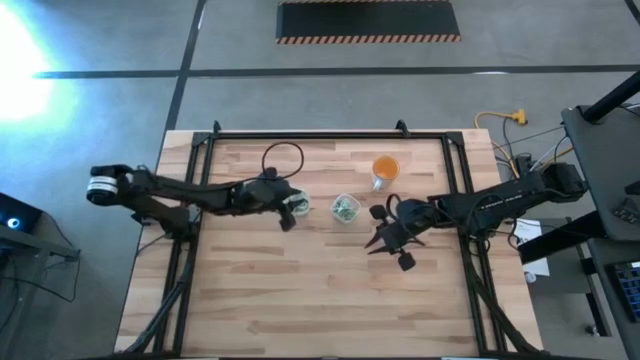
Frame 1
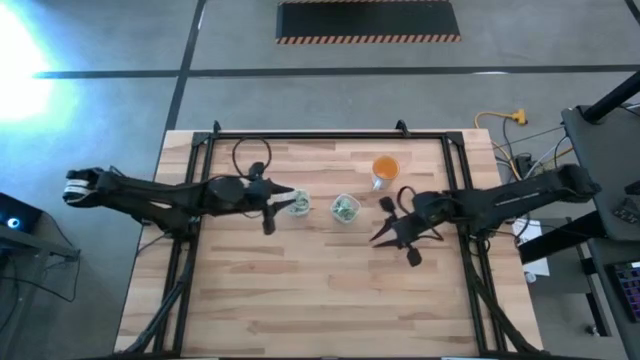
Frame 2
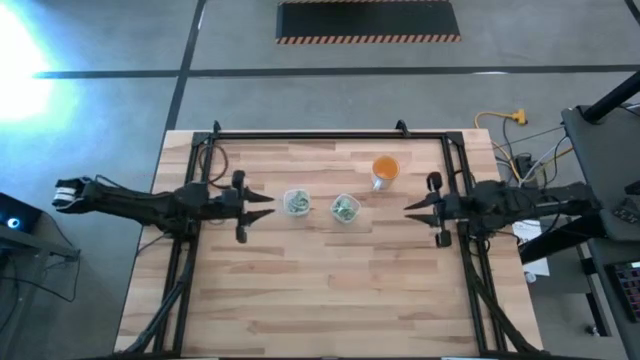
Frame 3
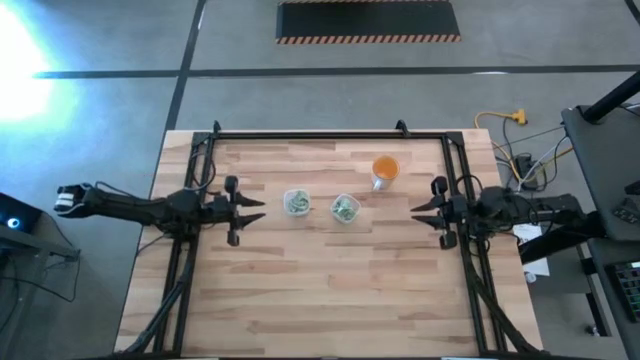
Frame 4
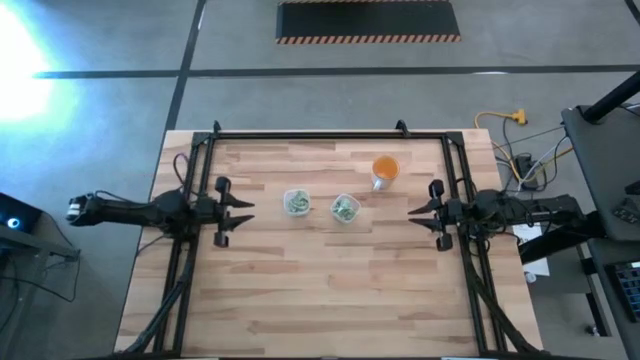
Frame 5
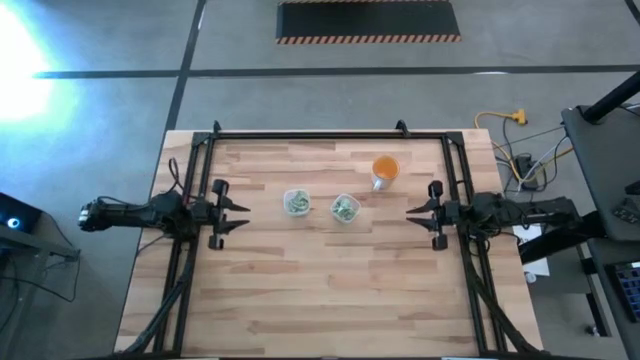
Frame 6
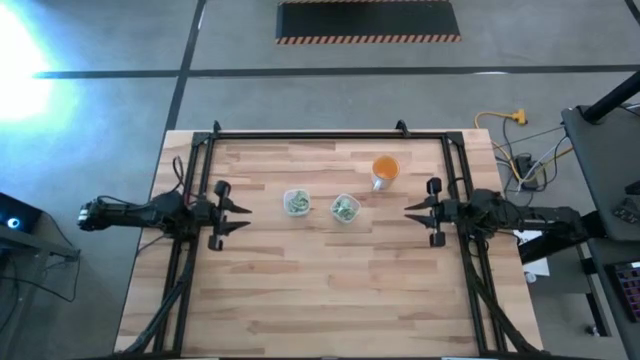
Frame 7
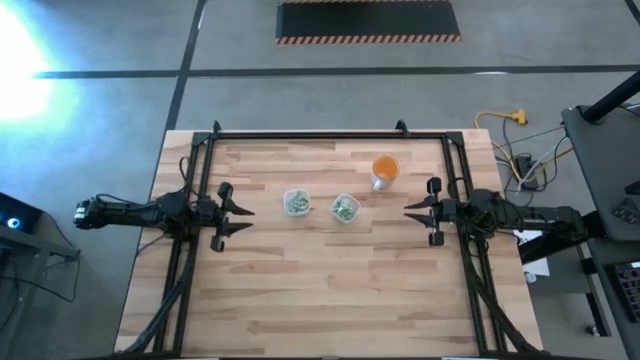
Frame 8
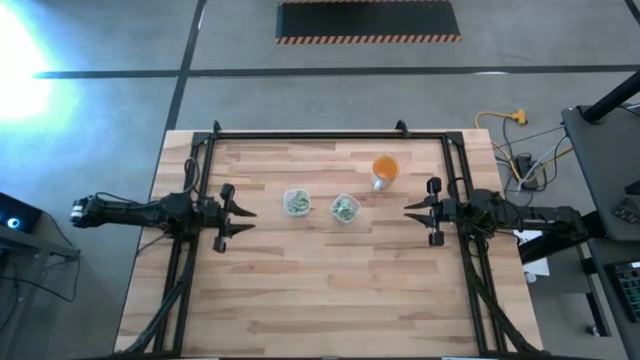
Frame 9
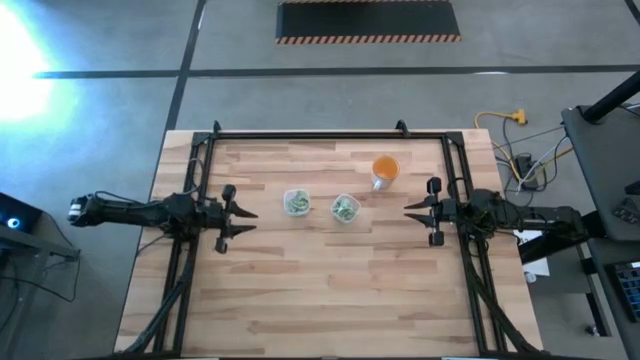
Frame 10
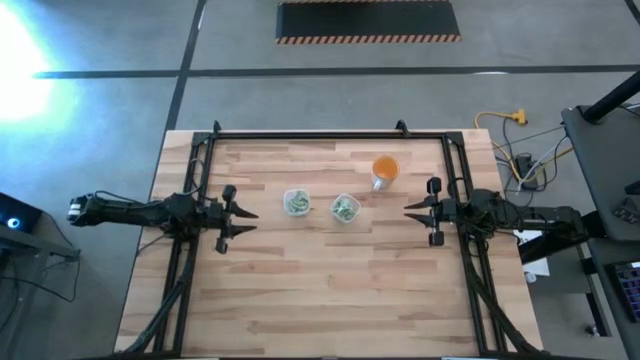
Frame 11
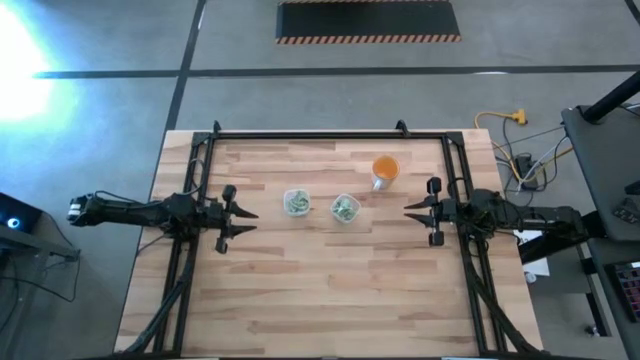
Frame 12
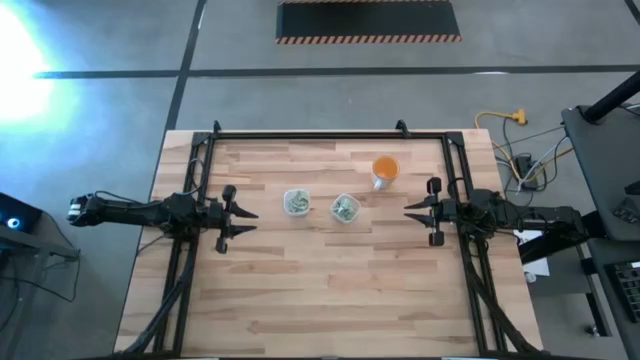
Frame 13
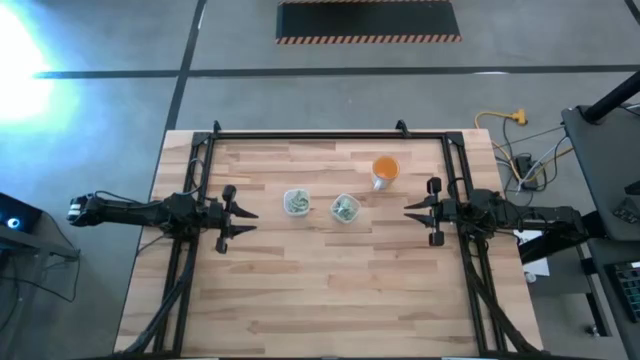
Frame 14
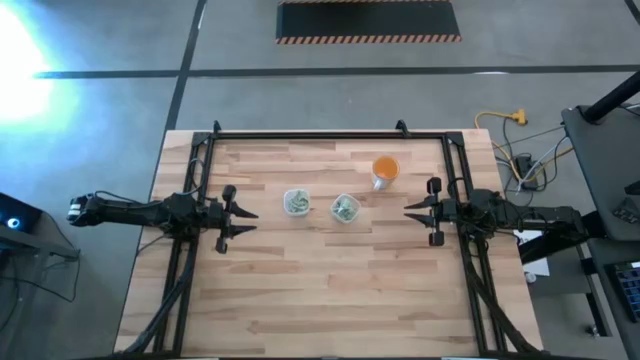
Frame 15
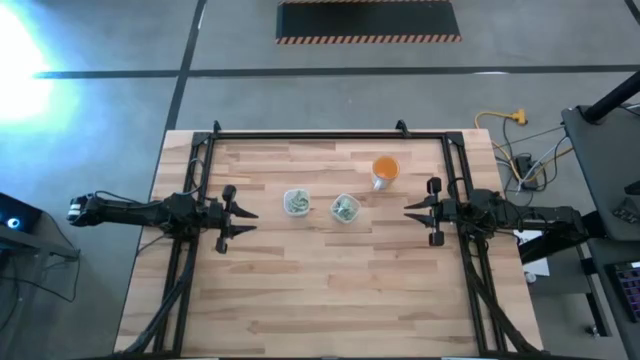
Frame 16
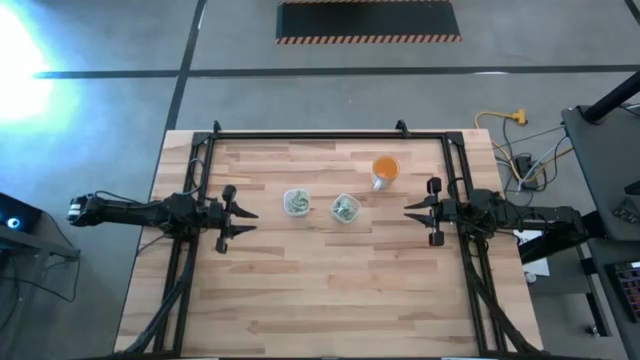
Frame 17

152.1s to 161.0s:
Task: Pick and place items into bin
Return to Home Position

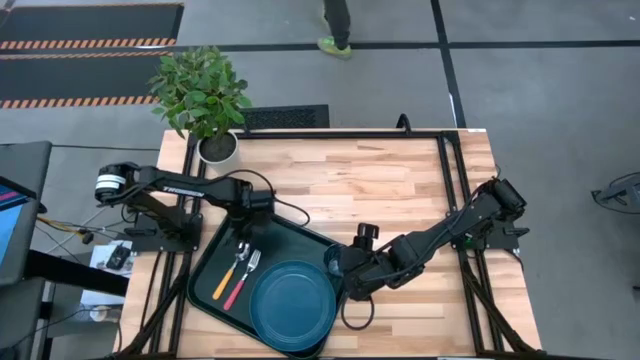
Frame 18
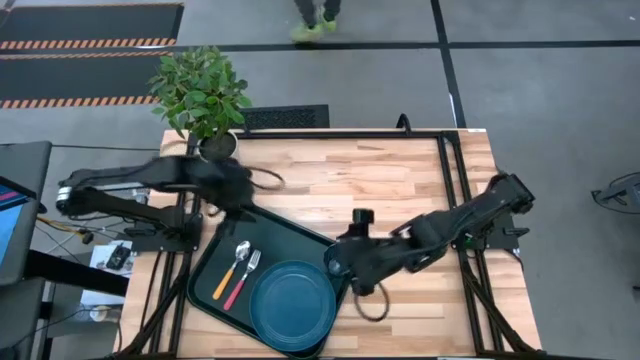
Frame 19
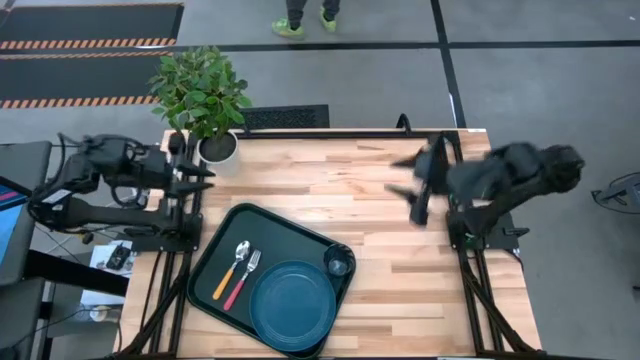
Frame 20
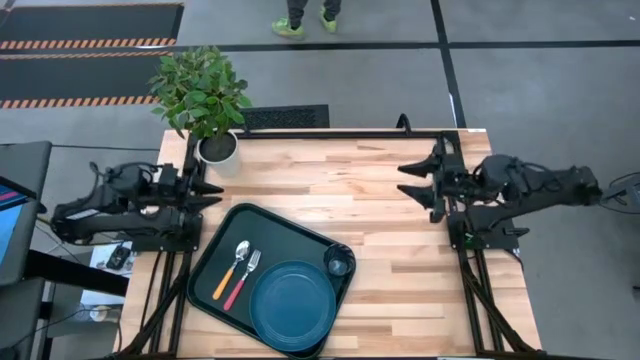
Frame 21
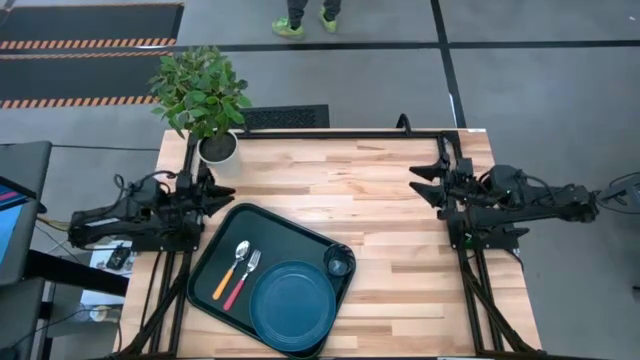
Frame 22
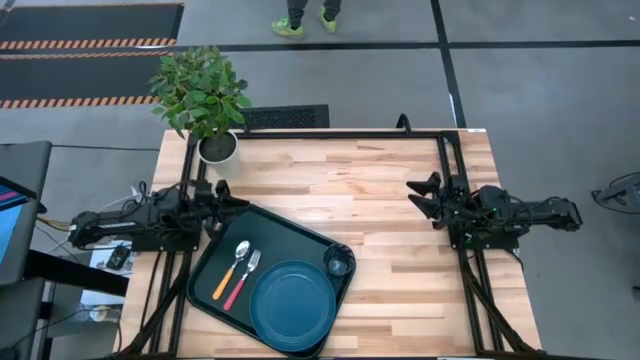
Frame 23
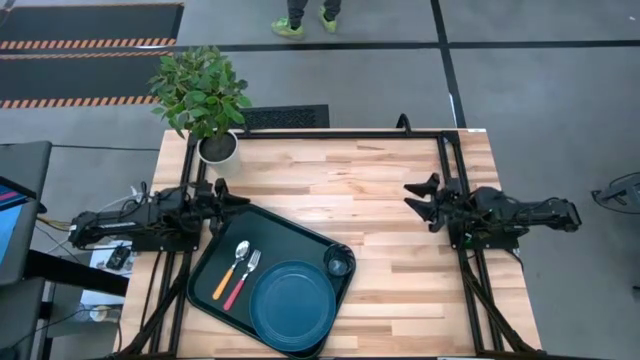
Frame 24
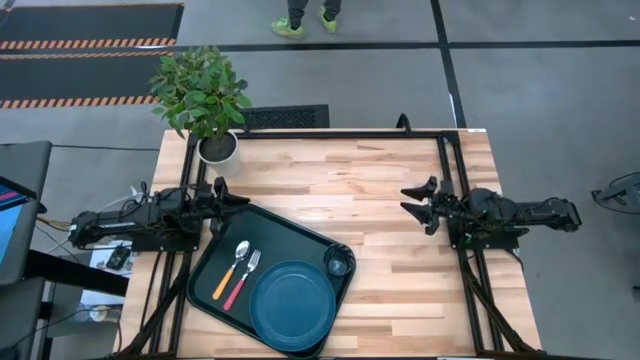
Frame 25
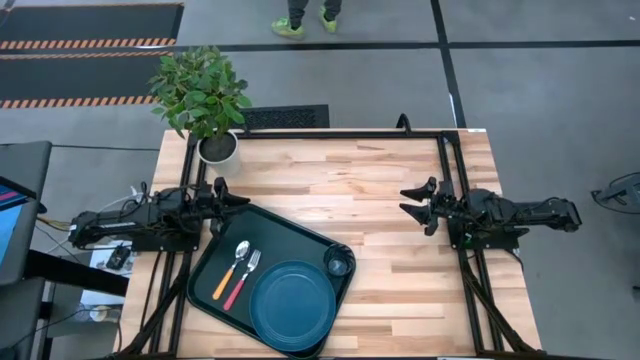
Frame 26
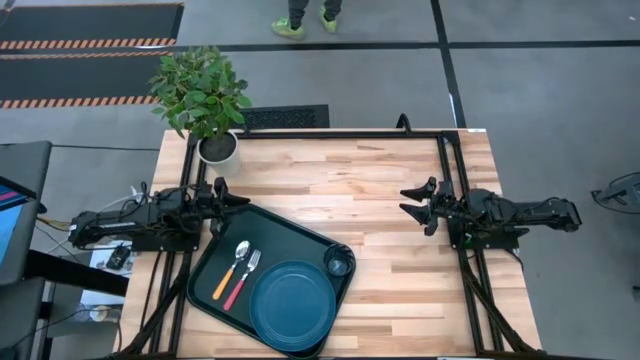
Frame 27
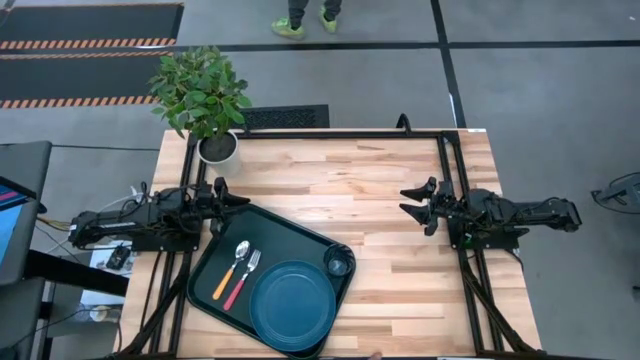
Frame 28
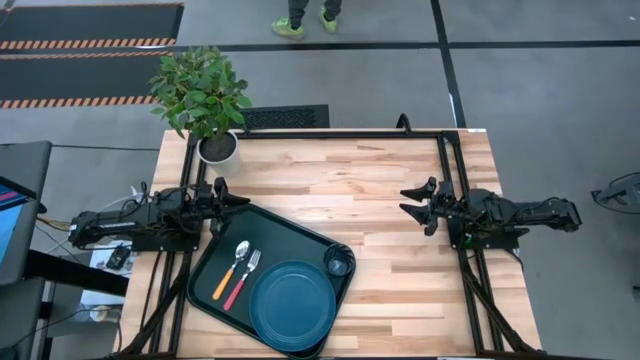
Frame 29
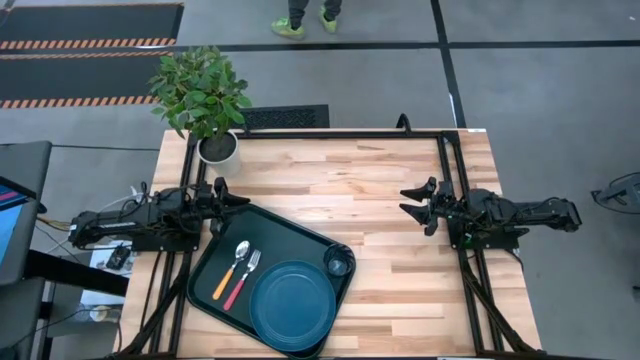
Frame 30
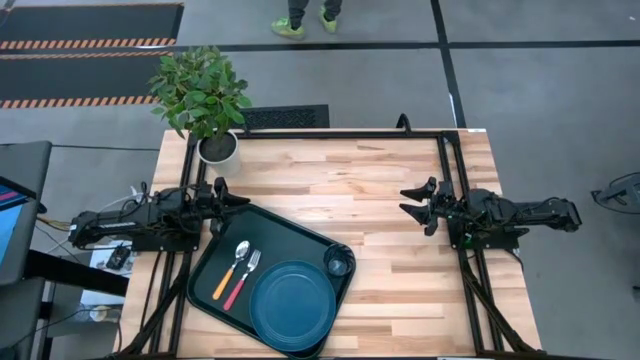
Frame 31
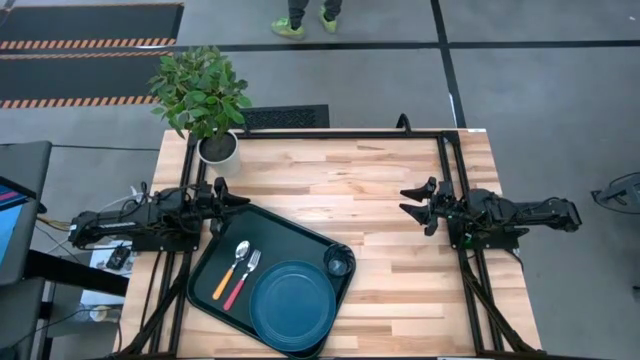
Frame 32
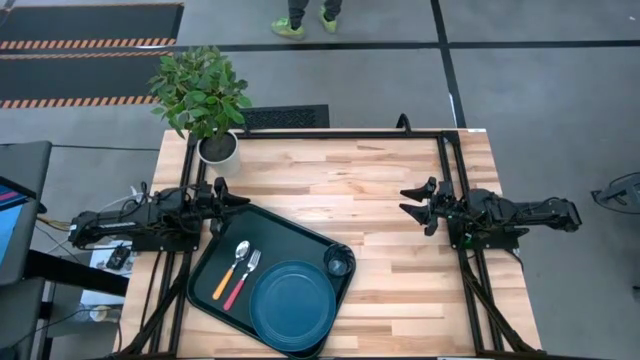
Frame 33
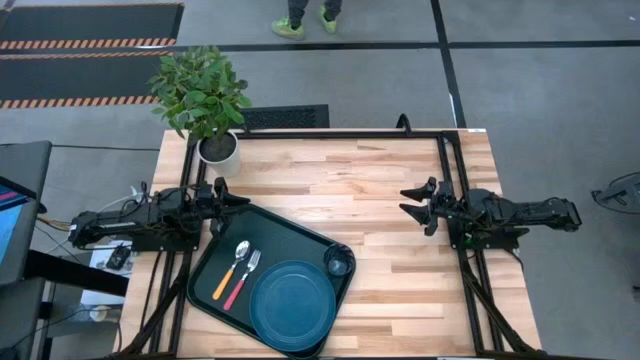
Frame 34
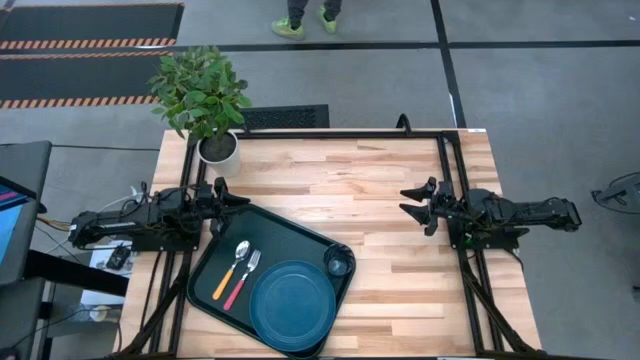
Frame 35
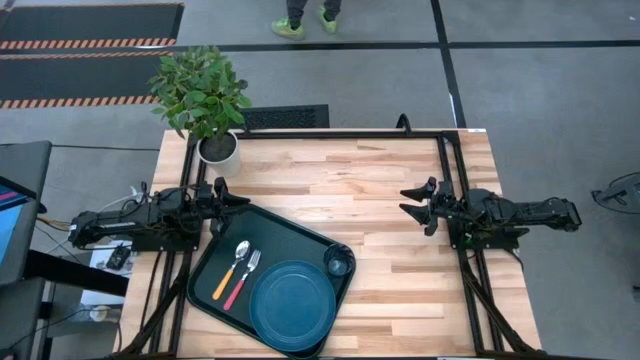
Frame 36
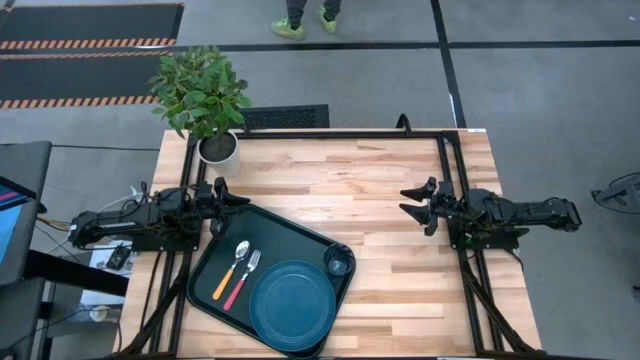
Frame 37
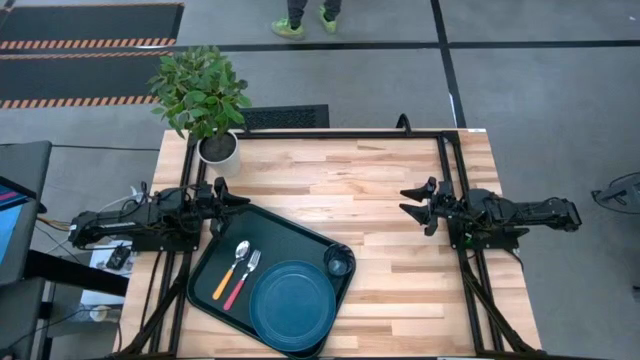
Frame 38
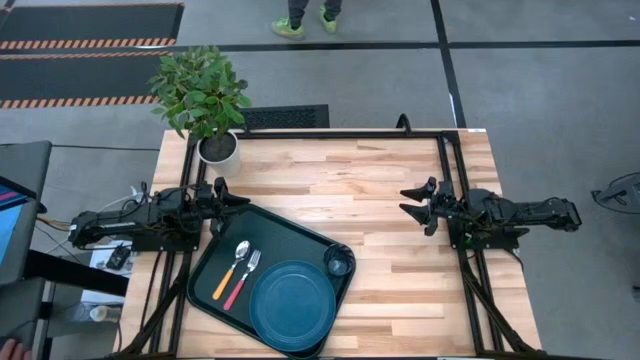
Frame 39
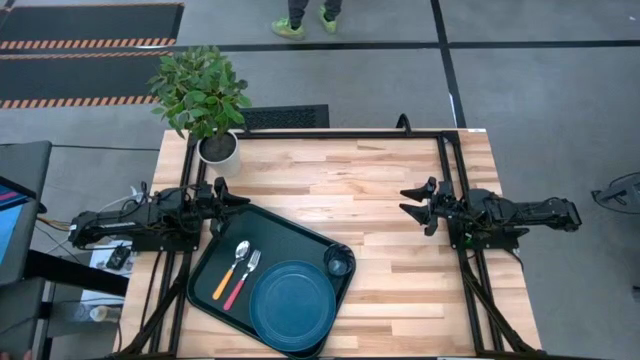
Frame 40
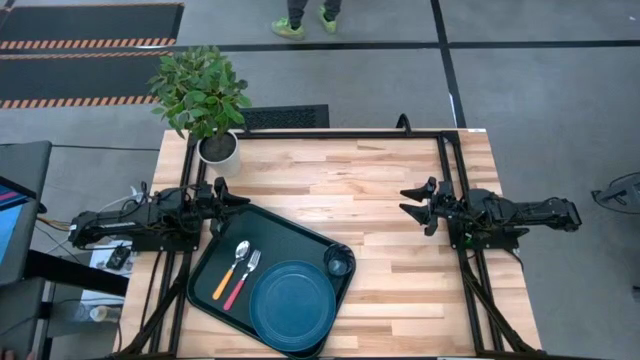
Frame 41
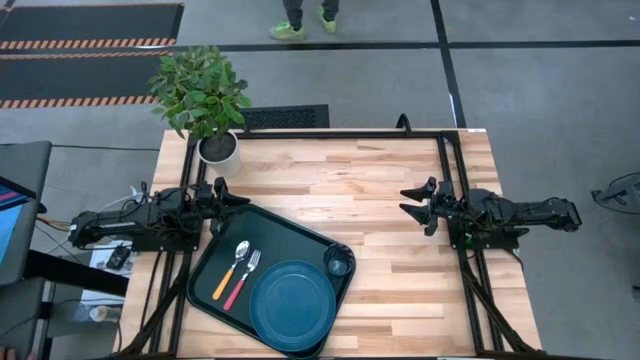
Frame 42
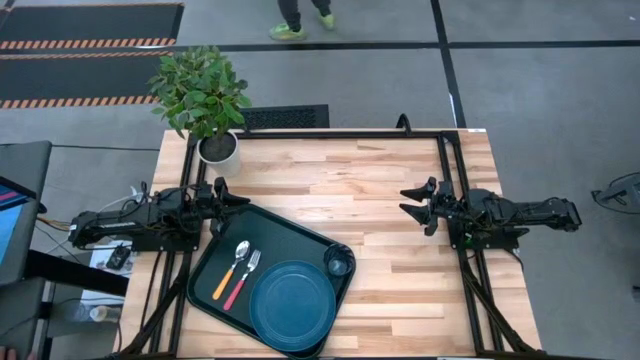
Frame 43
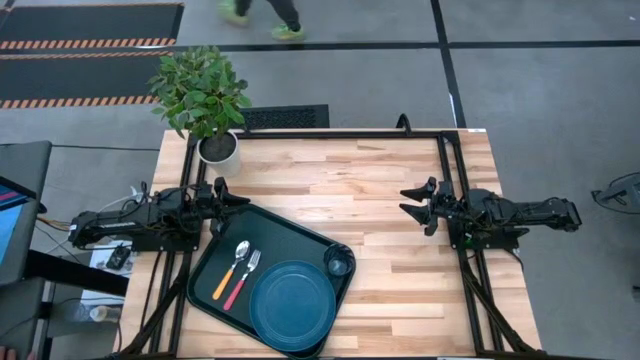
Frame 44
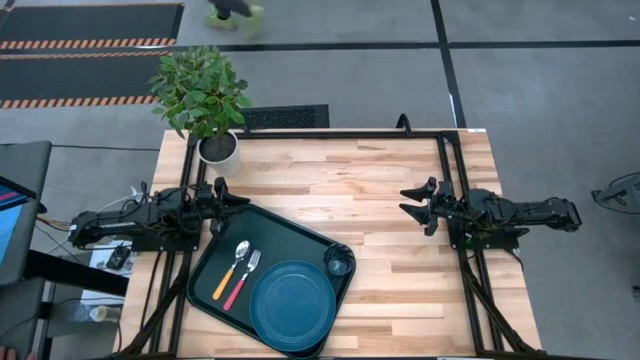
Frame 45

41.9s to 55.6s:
Task: Pick and place plate/cup/fork/spoon on tray
Return to Home Position
